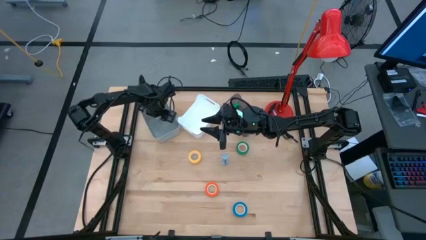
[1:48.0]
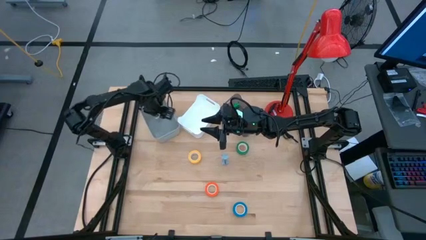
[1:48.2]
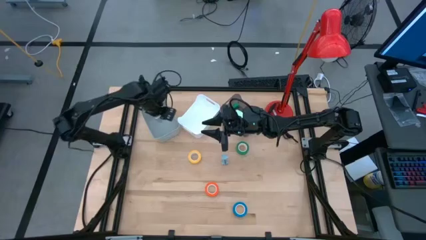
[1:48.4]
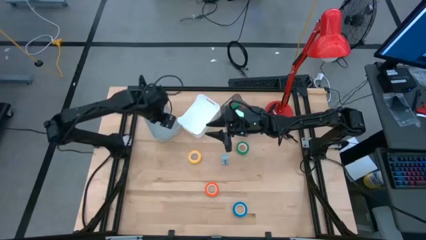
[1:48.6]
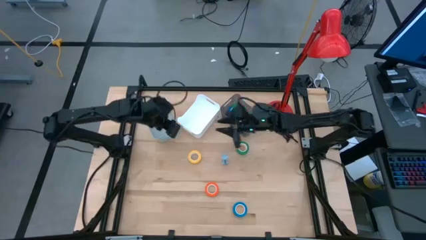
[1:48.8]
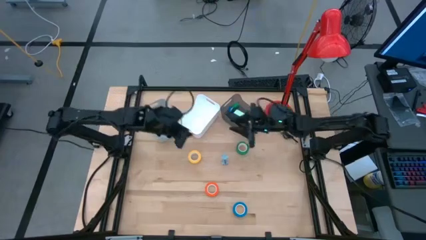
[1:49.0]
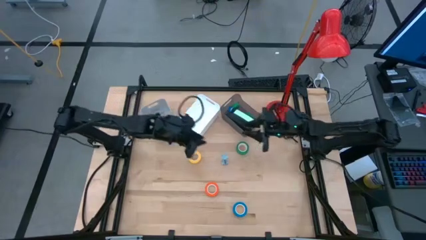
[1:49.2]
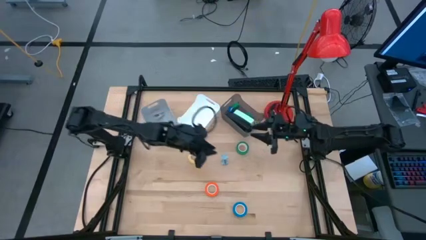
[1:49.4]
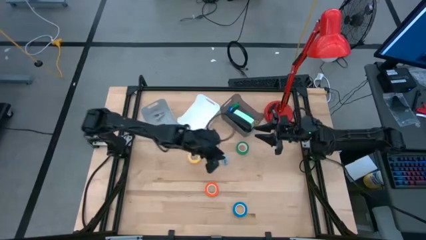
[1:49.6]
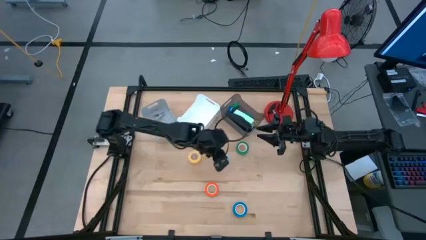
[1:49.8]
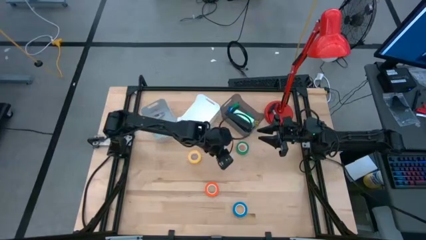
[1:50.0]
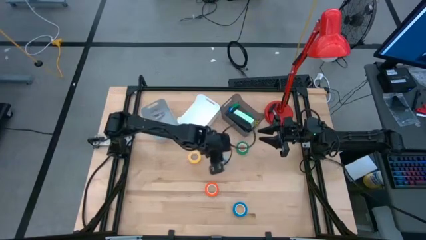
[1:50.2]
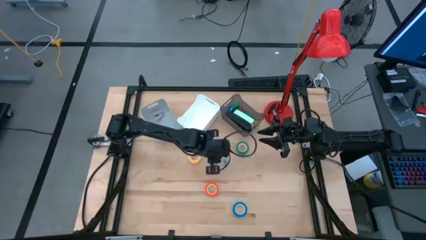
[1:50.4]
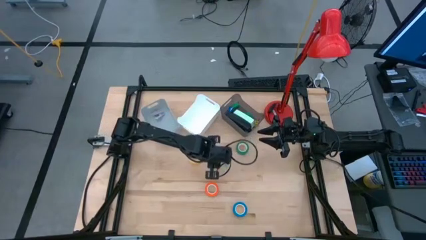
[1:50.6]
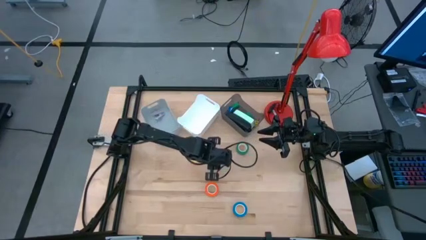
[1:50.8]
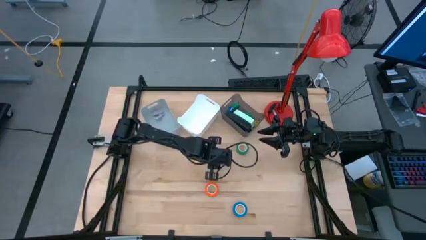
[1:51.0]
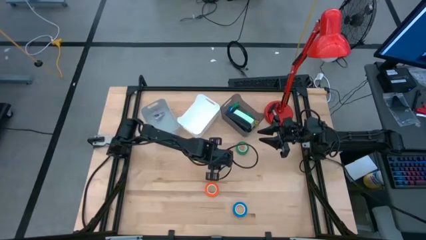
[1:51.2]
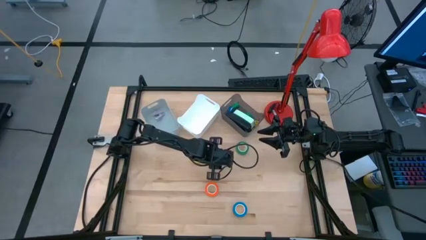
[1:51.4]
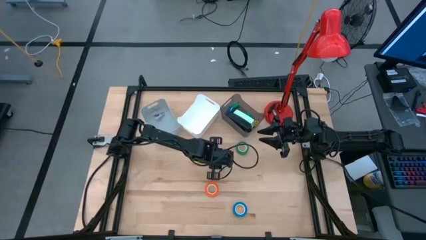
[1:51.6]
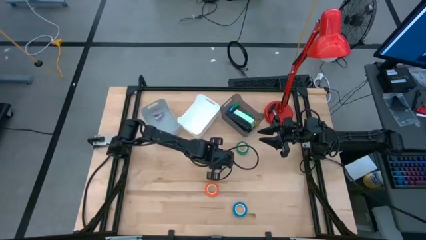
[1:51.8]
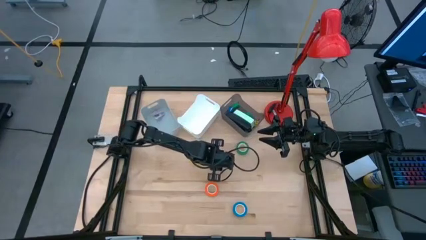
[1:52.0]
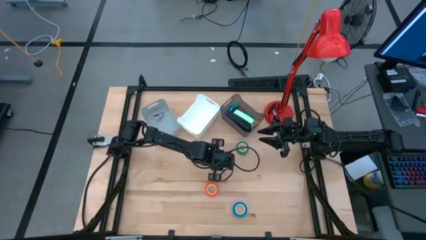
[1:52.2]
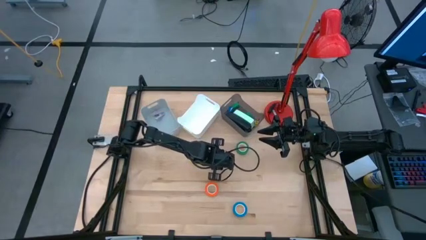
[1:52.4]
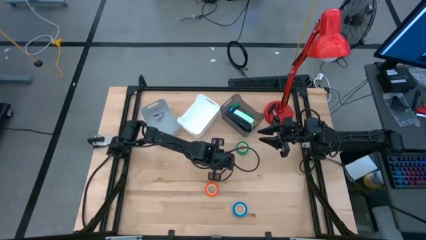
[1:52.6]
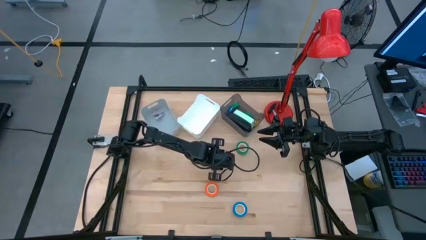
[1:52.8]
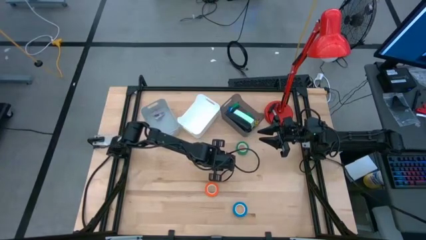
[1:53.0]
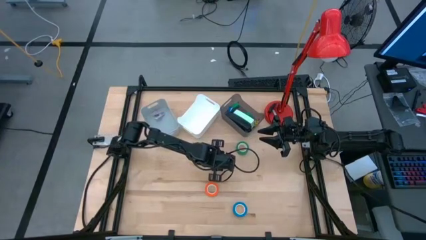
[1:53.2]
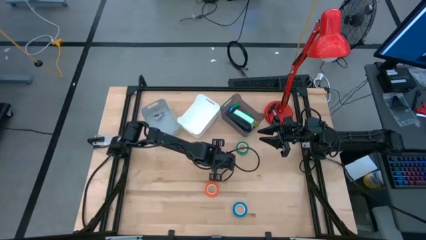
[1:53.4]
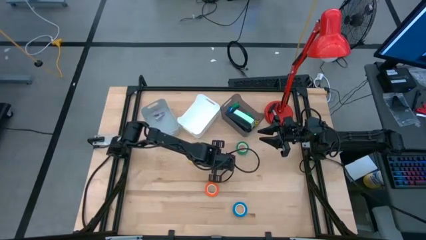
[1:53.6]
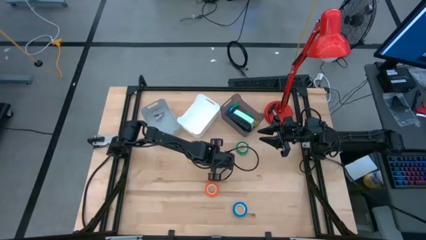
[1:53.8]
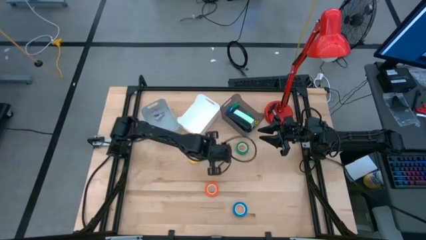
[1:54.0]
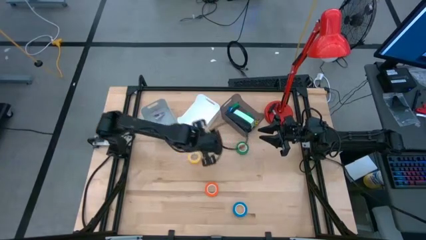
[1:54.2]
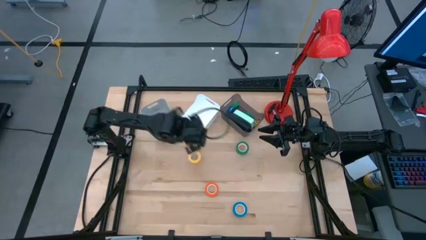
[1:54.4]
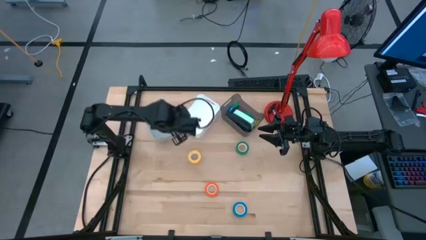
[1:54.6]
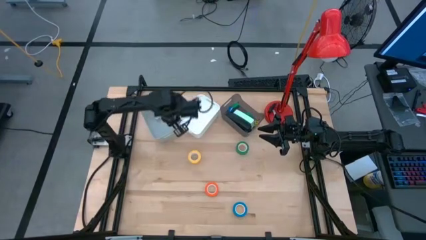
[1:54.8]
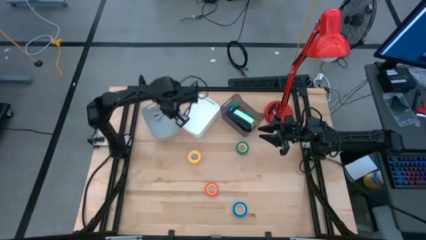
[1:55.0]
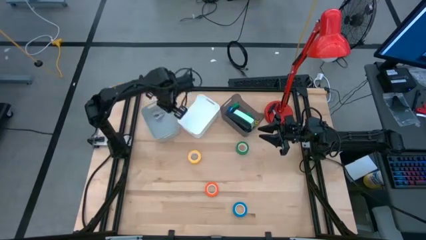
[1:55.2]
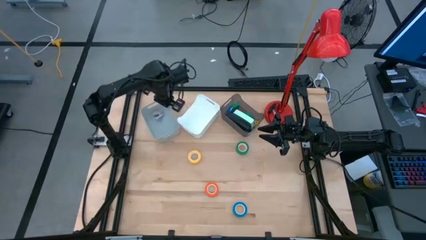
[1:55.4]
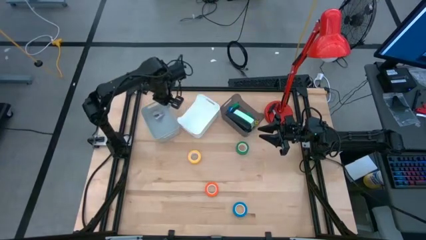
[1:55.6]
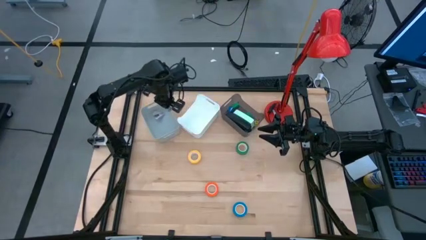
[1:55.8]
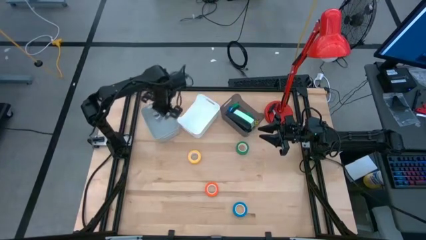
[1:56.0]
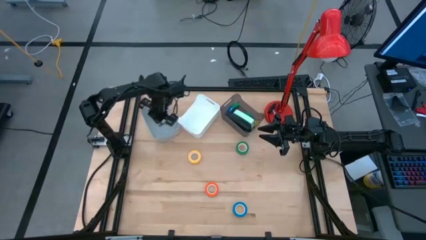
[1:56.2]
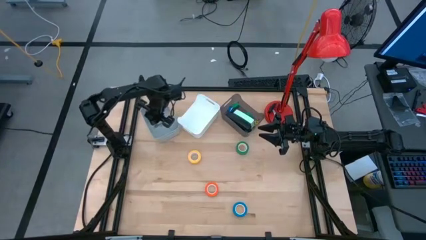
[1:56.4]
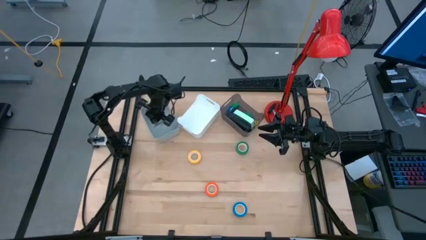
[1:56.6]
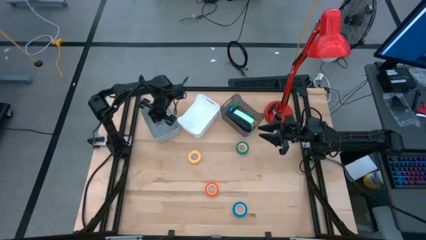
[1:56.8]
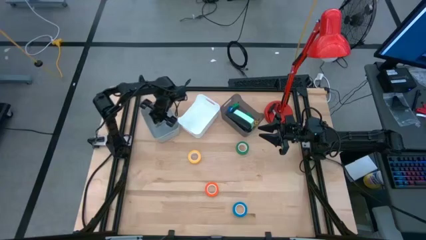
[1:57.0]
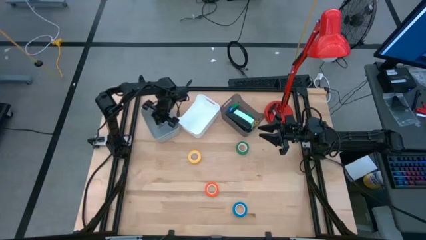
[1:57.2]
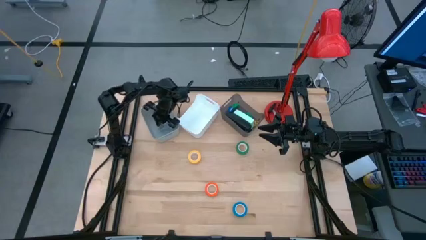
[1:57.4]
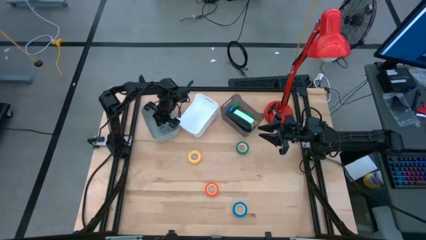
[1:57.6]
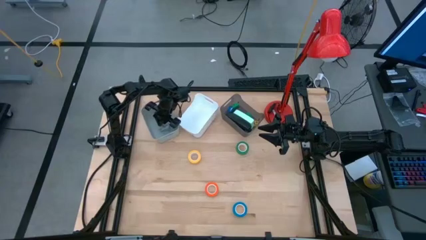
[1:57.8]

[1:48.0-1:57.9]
Task: Pick and place Stapler, Stapler remover, tape
Put the blue staple remover into the gray bin

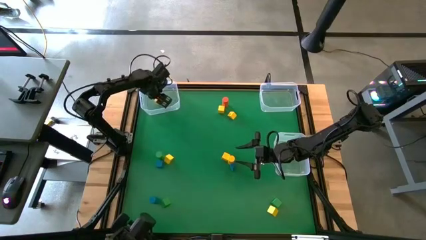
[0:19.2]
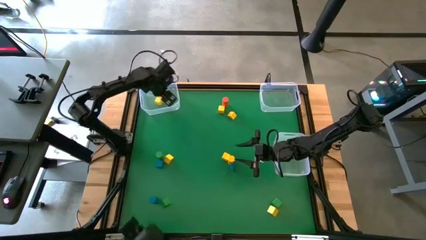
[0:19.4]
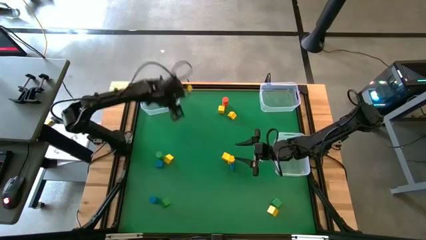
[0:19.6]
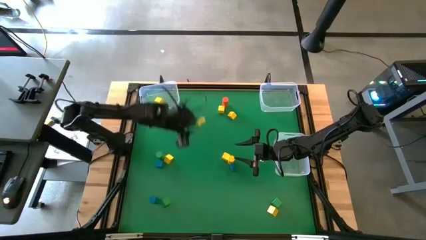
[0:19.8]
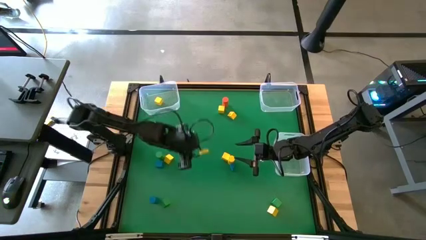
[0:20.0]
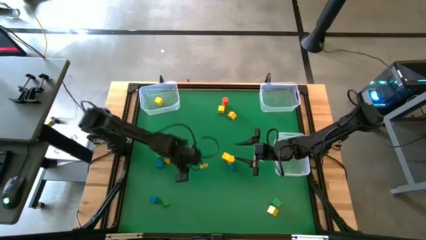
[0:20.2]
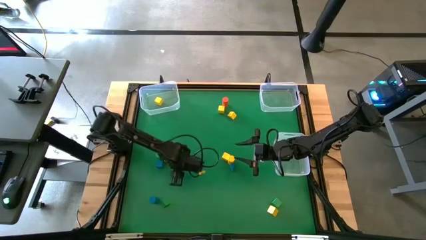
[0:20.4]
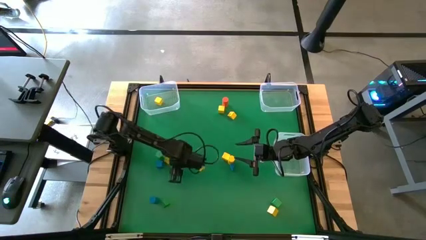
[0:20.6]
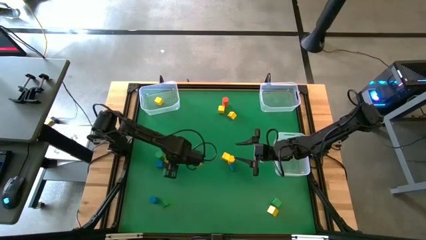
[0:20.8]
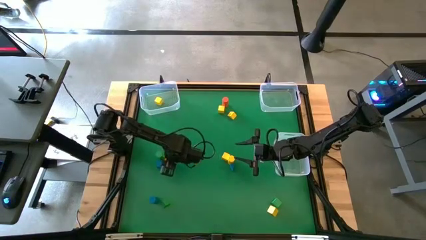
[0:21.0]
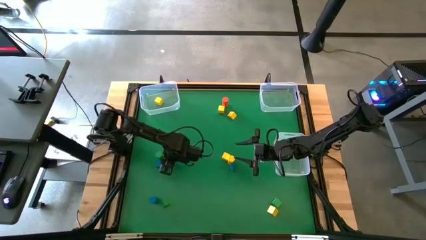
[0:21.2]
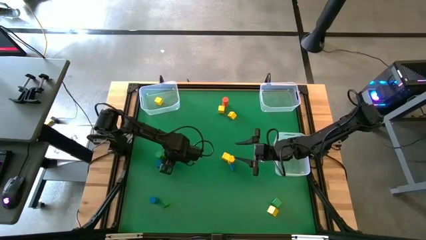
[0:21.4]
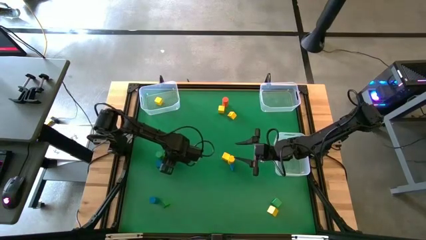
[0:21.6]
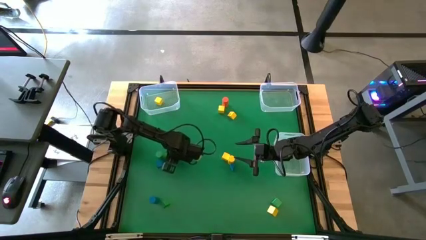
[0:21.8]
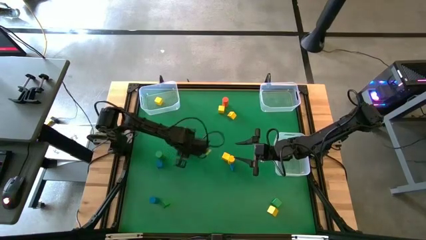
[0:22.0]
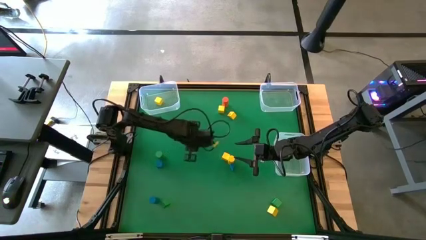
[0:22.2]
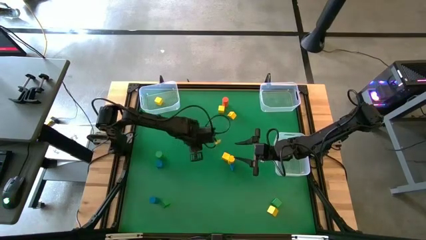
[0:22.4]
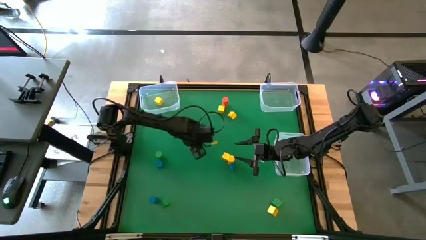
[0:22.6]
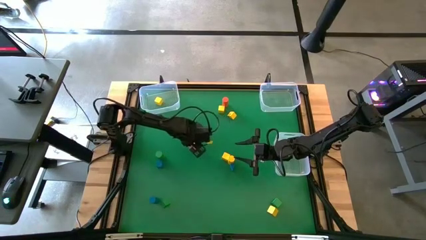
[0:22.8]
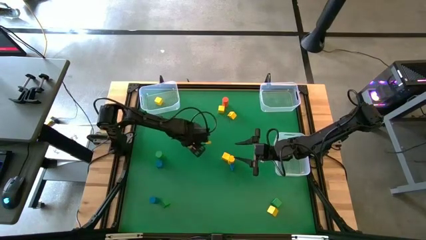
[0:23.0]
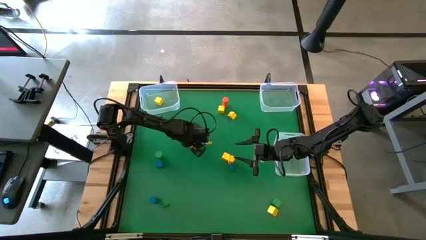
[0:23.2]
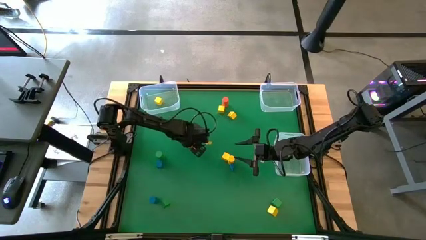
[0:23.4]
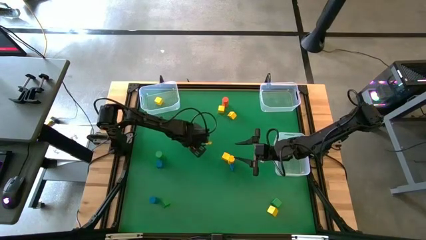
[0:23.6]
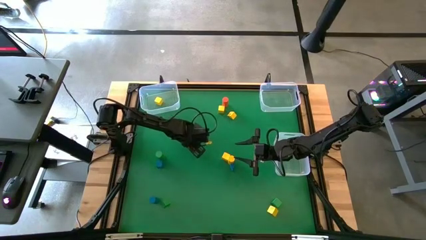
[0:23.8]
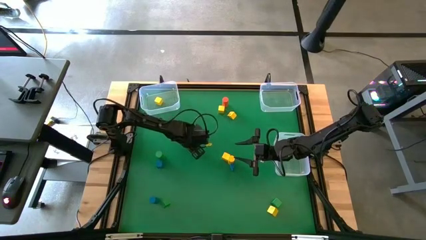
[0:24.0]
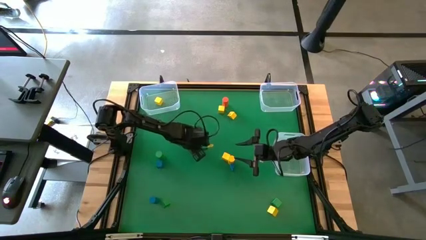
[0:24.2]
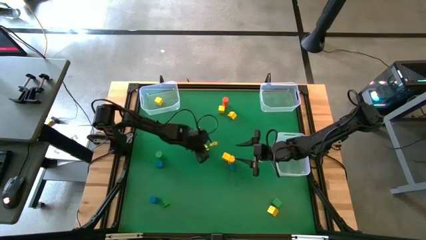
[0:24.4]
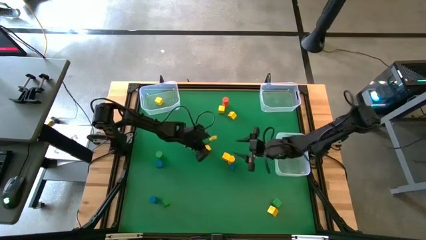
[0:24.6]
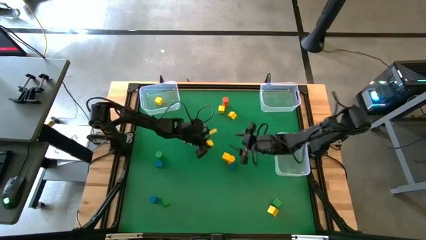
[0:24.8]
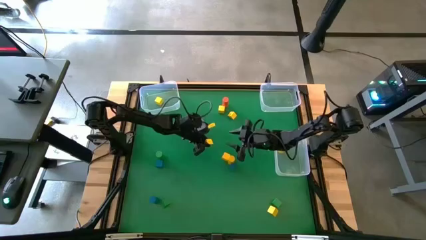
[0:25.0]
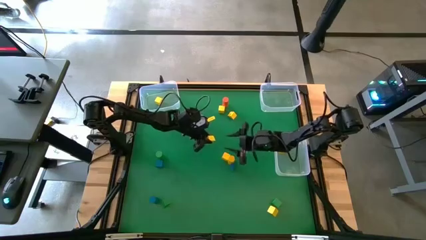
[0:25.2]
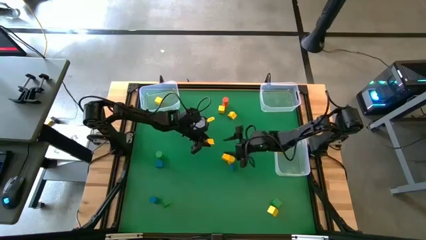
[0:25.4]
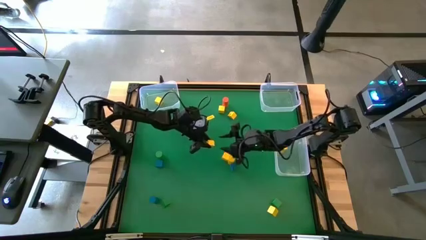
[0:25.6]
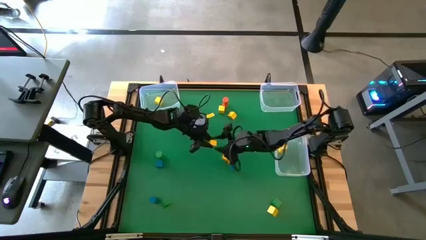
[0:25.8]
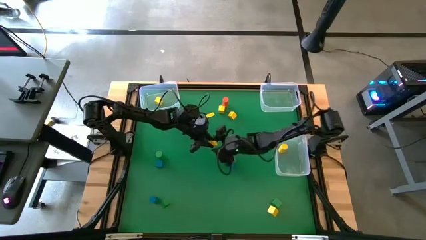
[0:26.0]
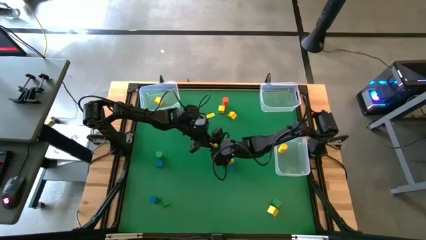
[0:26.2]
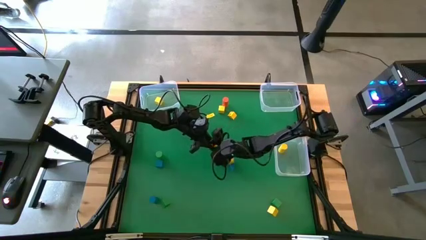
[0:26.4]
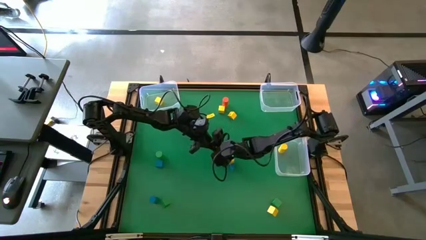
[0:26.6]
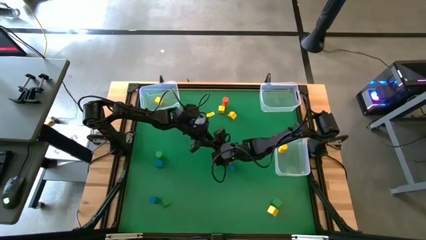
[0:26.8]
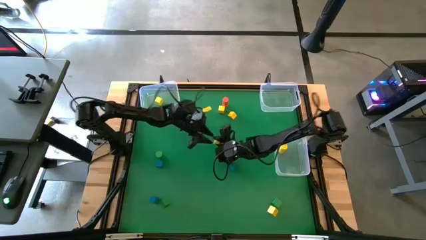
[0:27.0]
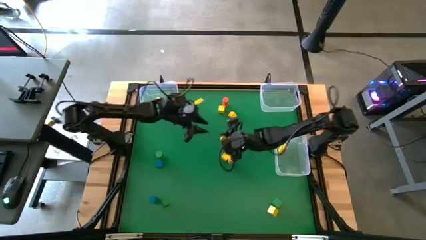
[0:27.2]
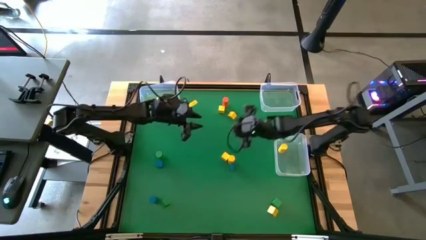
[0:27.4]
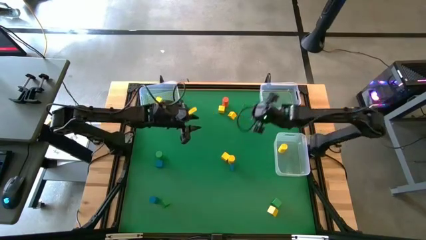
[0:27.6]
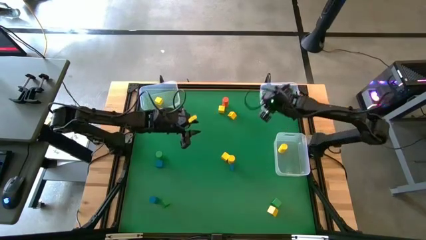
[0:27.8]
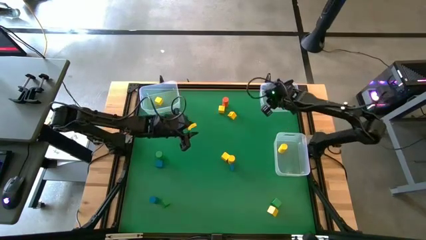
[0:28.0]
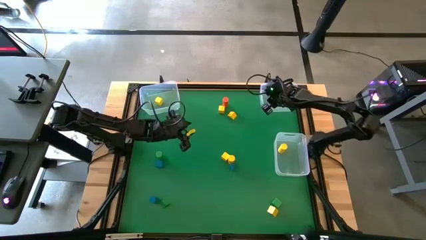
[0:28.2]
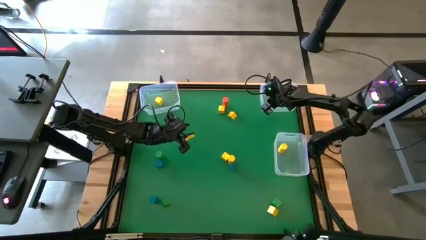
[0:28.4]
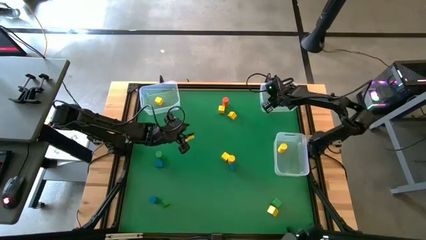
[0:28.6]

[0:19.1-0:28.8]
Task: Sort blocks by size
Put the yellow triangular block into the top right transparent bin
